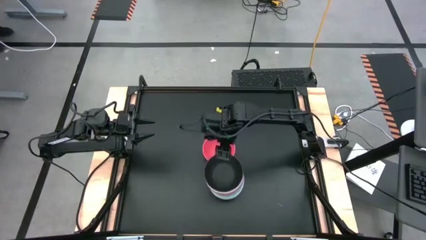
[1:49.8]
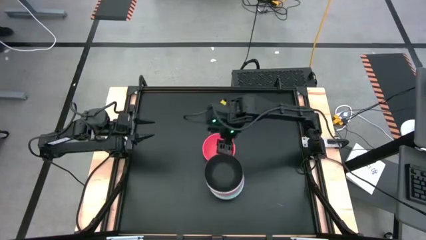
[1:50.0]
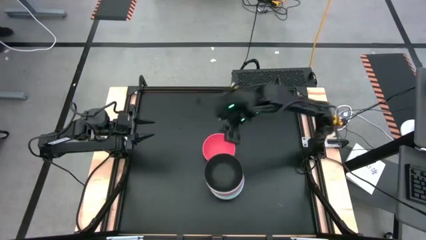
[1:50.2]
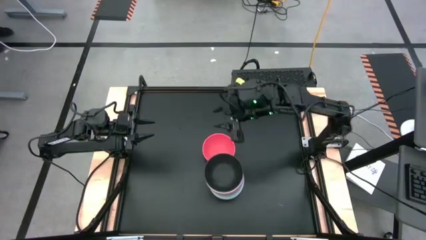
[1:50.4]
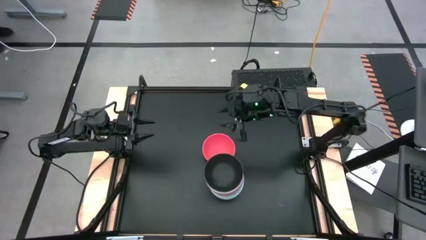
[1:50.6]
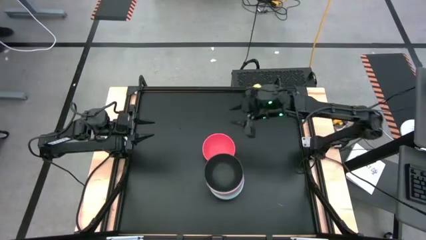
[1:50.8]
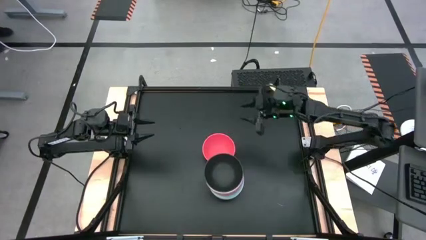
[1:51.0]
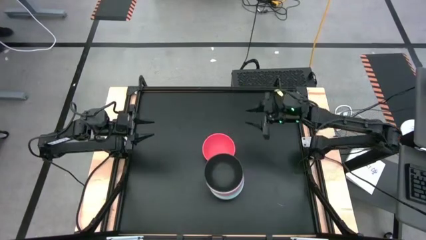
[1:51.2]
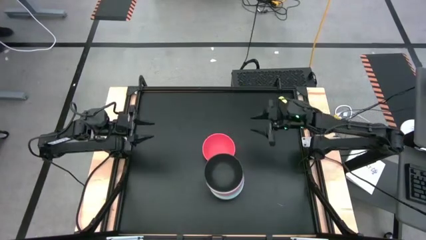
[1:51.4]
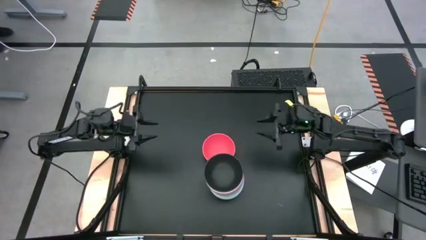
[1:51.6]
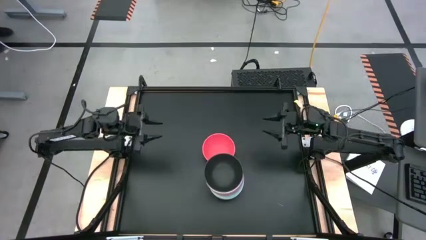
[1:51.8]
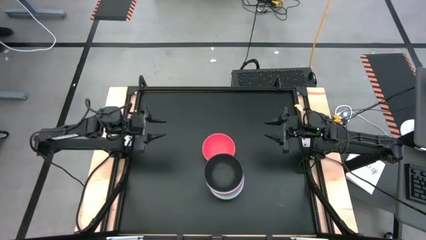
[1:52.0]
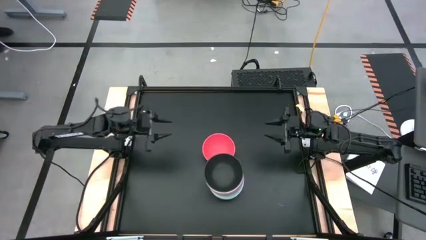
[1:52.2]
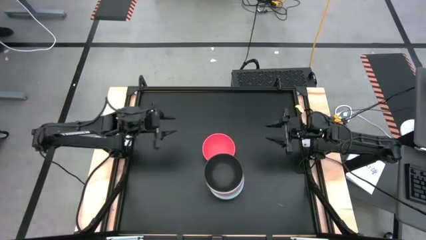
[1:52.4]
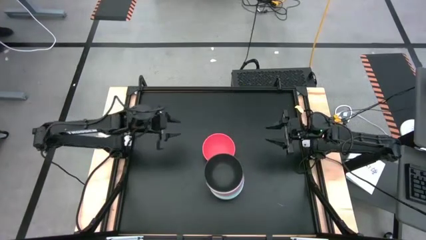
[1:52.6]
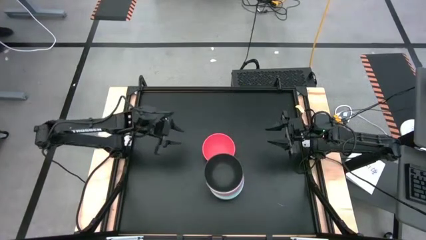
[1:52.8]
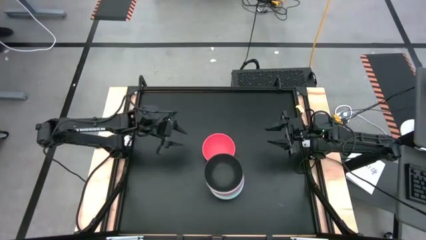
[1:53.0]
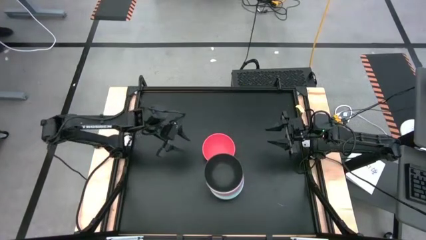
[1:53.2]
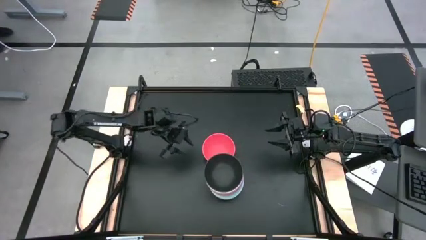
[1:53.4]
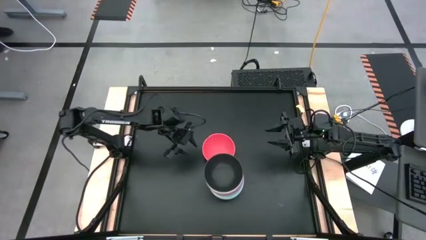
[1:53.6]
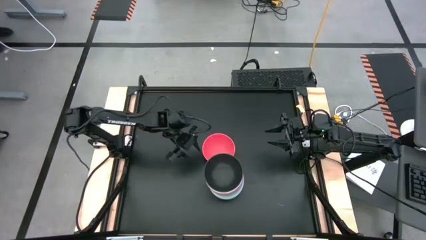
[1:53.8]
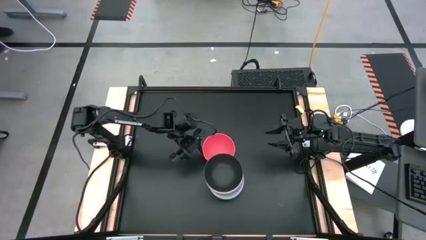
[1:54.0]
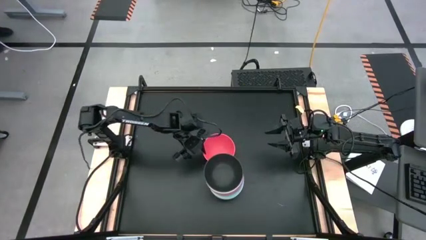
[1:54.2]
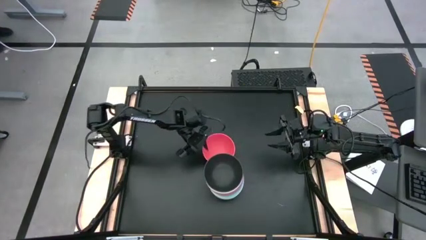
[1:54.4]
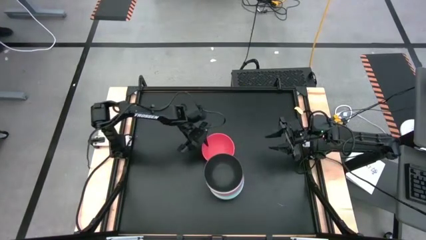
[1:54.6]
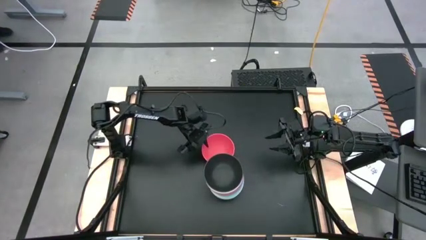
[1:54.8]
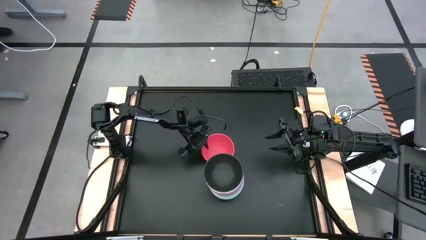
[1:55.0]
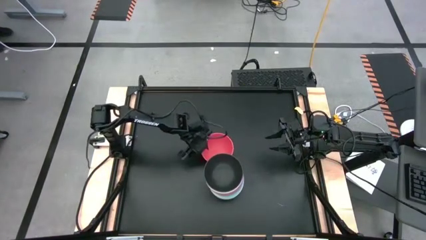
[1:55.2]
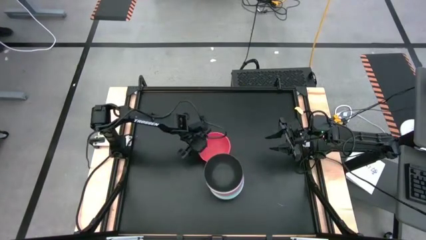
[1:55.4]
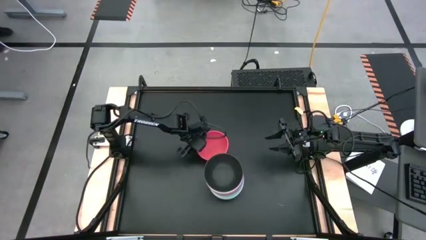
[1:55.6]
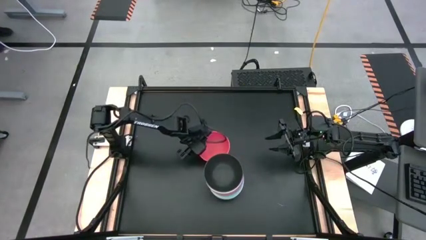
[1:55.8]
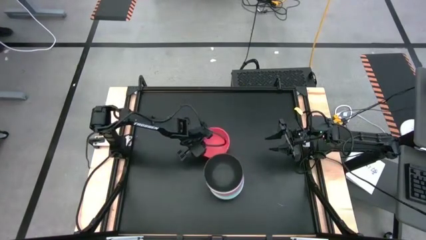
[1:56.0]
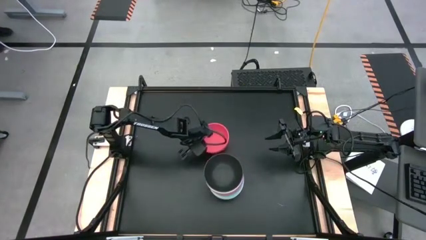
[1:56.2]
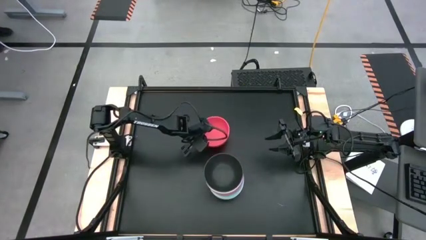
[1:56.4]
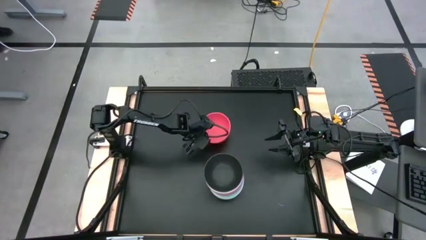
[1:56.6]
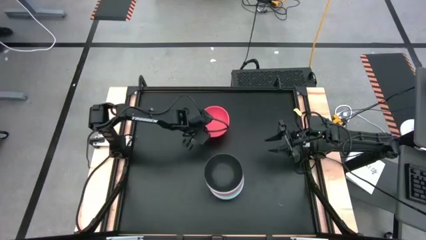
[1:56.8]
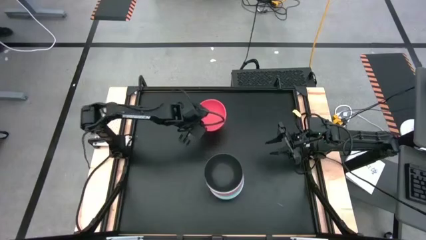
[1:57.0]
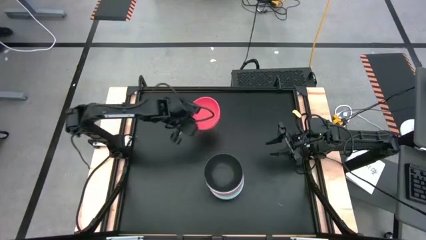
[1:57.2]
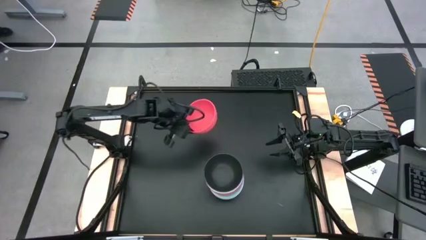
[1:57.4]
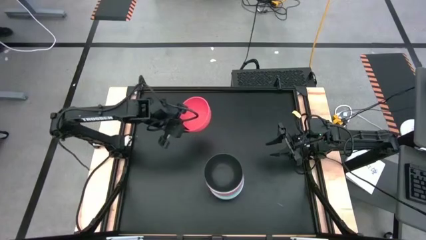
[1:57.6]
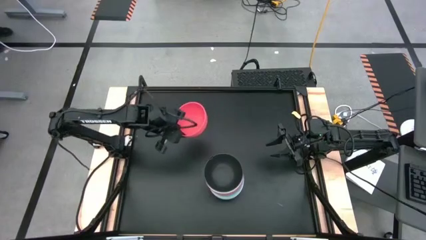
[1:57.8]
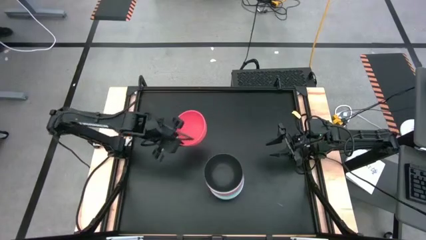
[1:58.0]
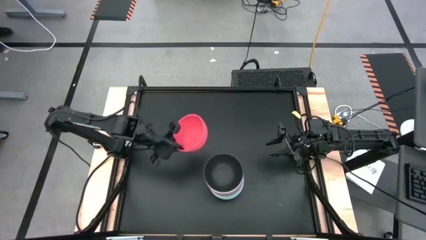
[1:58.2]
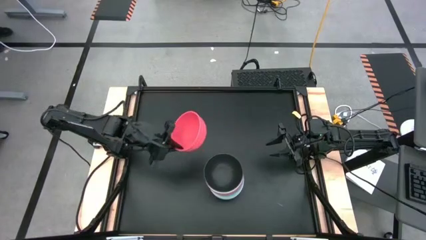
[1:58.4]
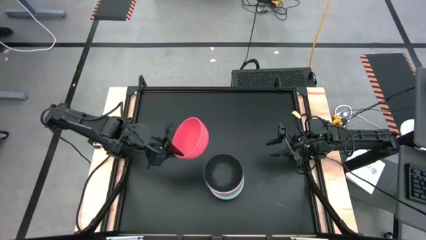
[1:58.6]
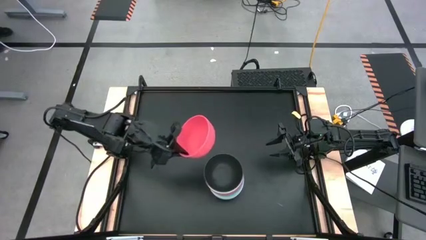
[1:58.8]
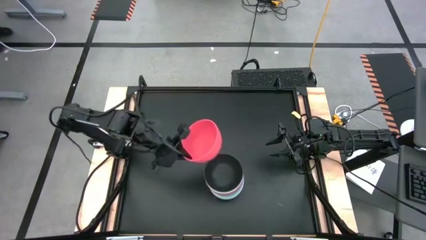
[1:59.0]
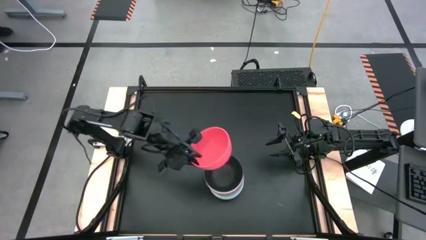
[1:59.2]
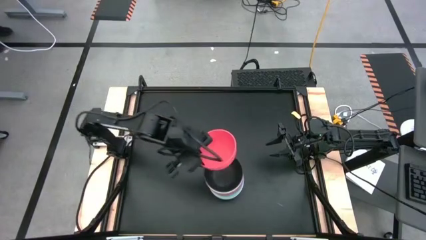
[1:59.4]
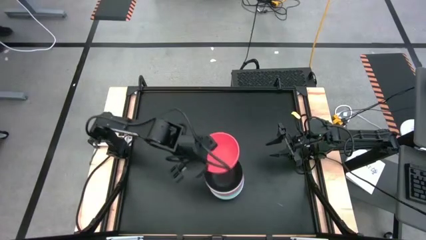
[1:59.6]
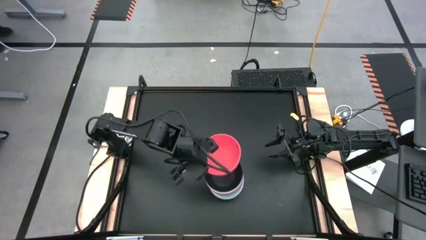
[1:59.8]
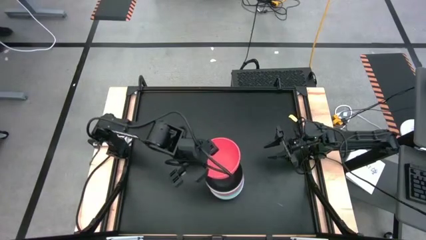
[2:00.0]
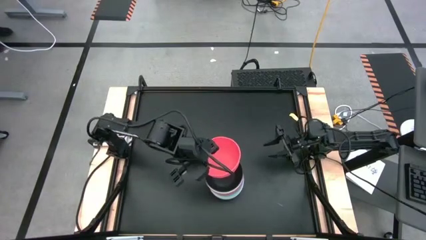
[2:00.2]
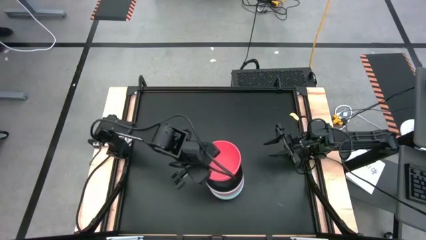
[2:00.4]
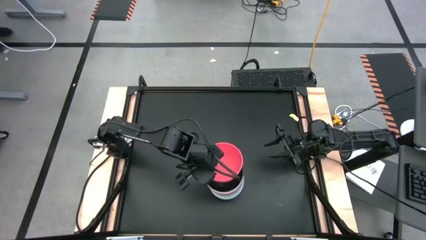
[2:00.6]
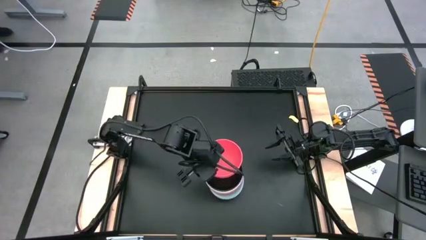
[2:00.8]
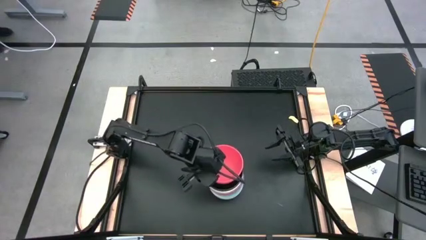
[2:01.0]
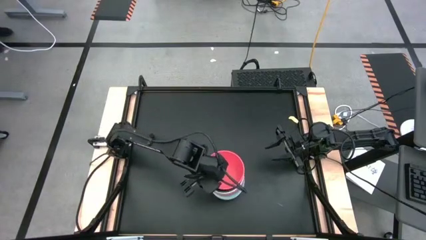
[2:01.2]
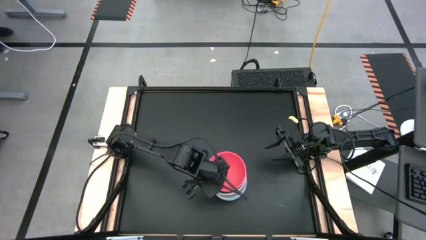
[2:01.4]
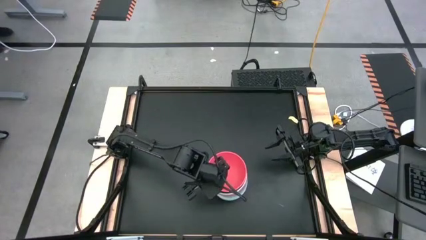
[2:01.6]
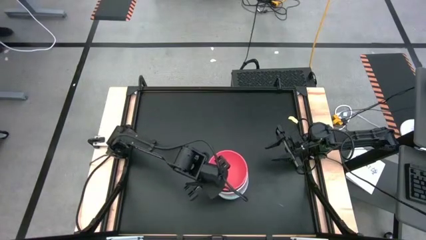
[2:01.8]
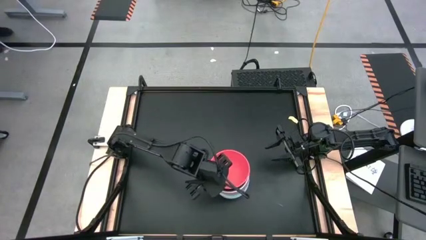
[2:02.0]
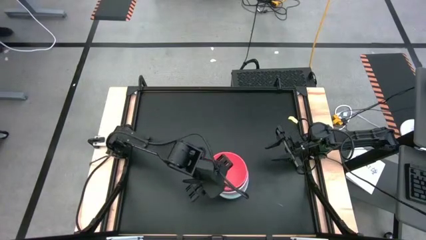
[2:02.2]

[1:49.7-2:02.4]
Task: Nest bowls inside each other
Stack the orange bowl on top of the black bowl
